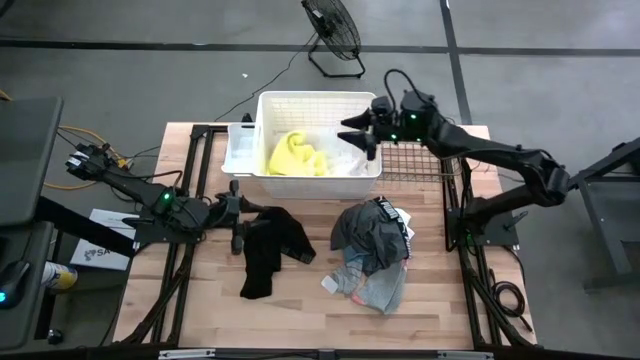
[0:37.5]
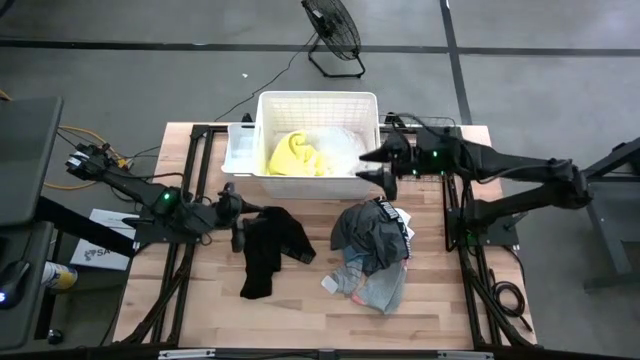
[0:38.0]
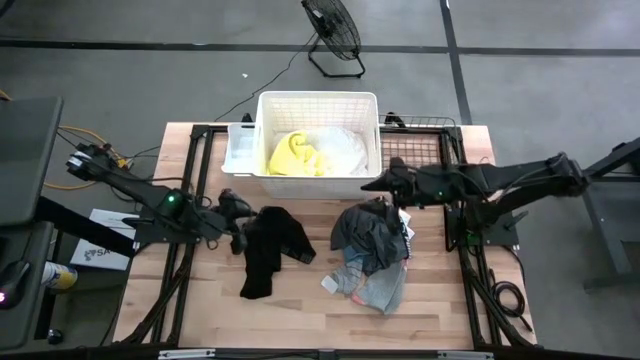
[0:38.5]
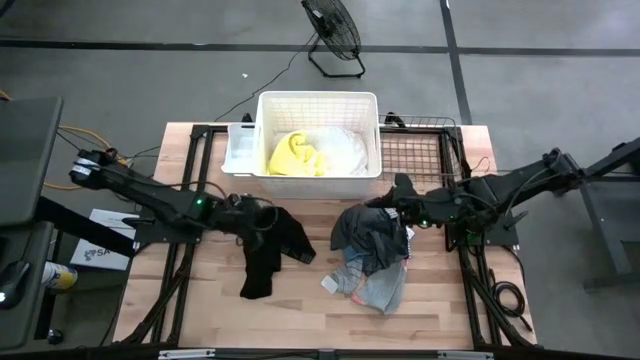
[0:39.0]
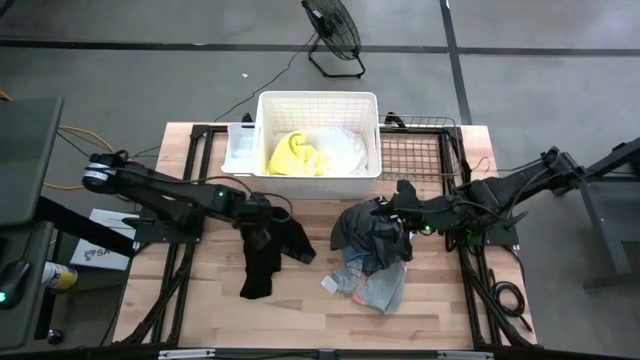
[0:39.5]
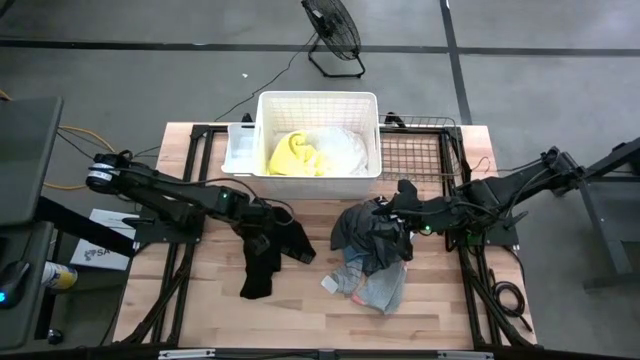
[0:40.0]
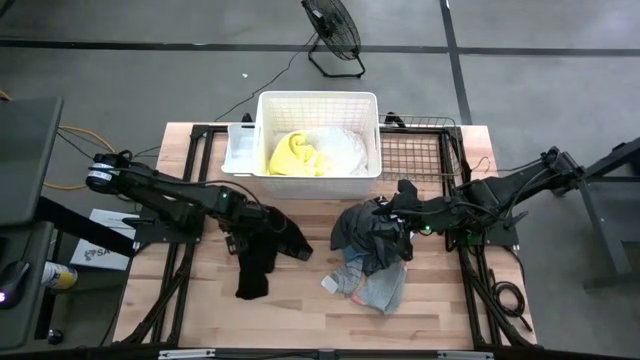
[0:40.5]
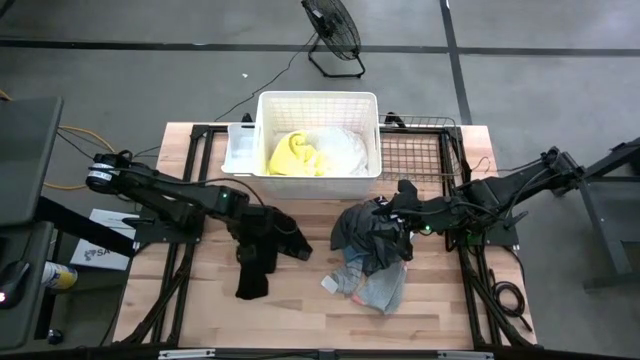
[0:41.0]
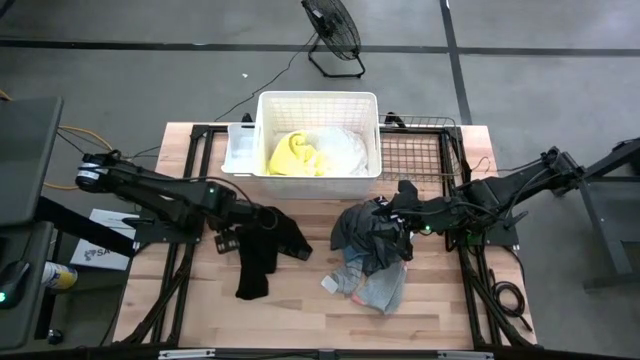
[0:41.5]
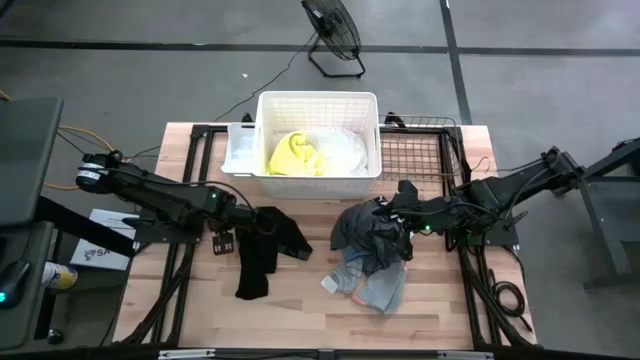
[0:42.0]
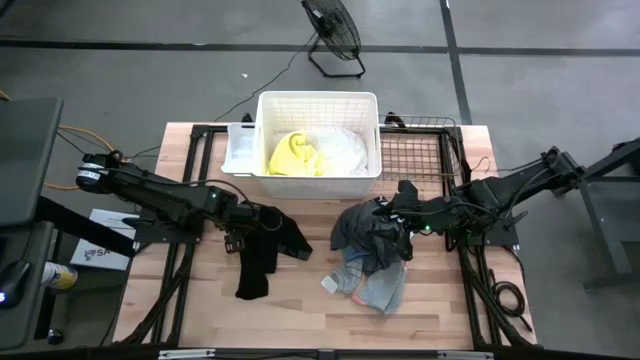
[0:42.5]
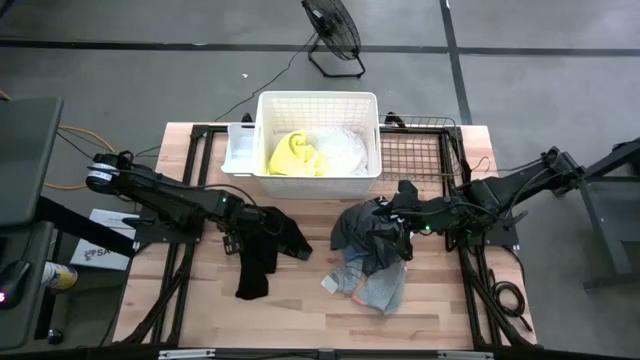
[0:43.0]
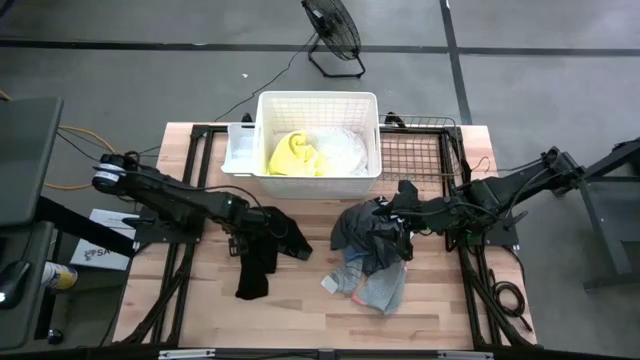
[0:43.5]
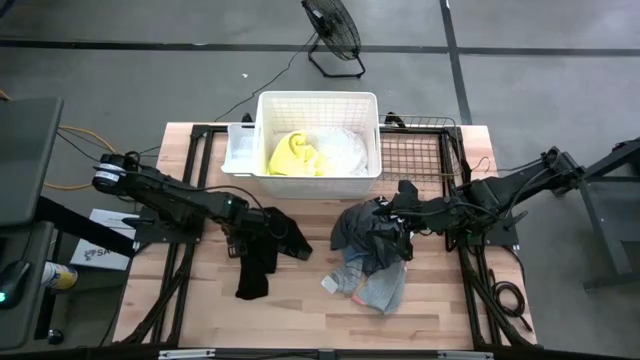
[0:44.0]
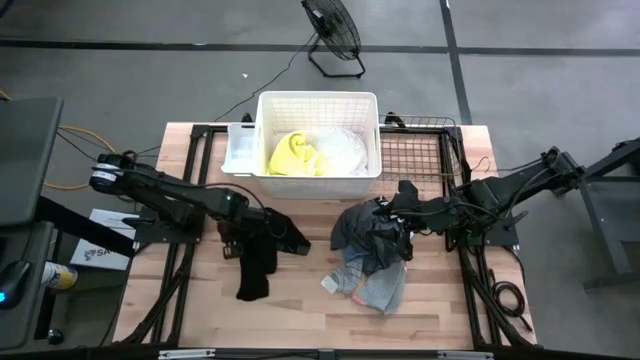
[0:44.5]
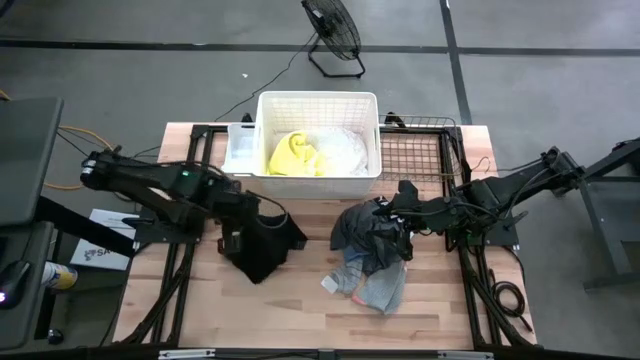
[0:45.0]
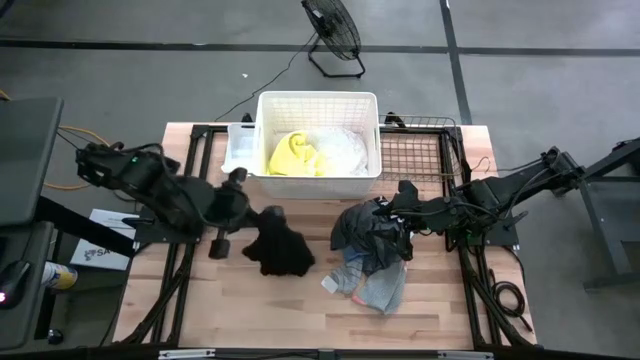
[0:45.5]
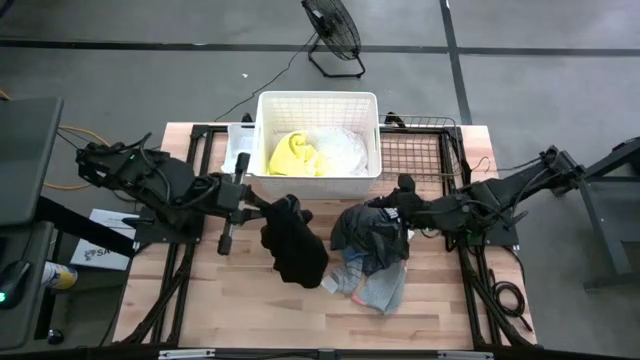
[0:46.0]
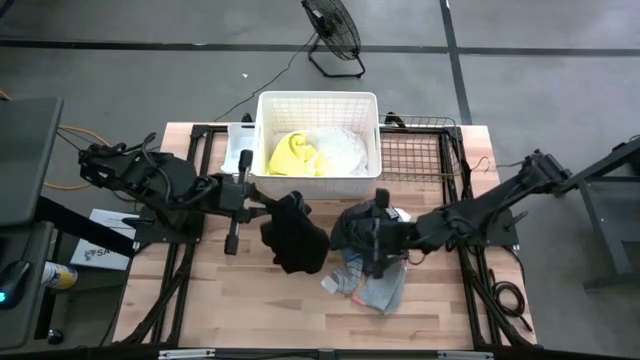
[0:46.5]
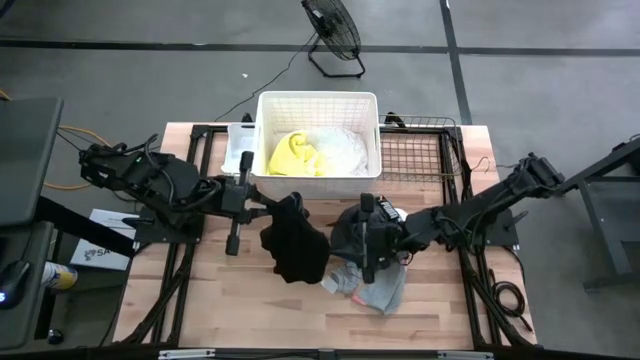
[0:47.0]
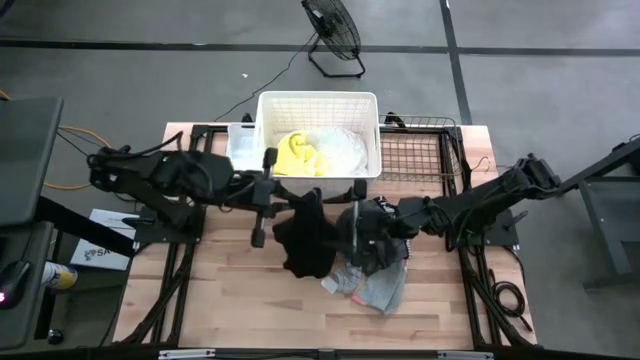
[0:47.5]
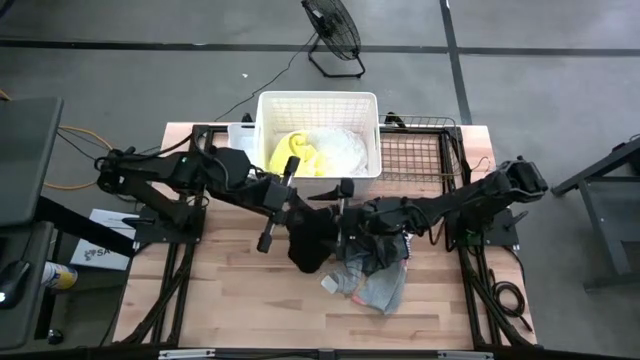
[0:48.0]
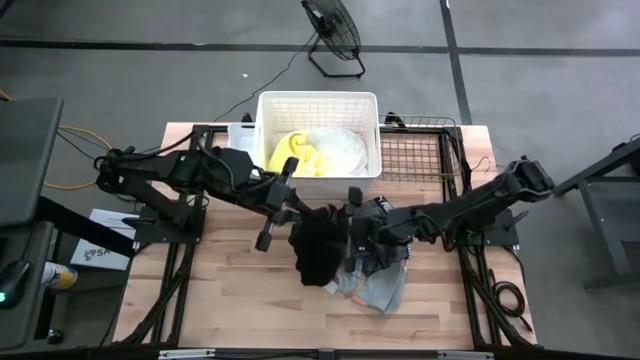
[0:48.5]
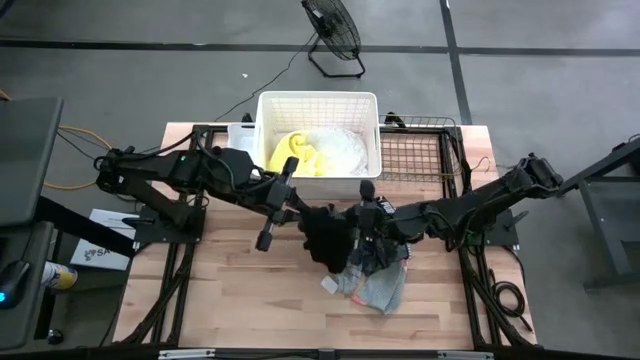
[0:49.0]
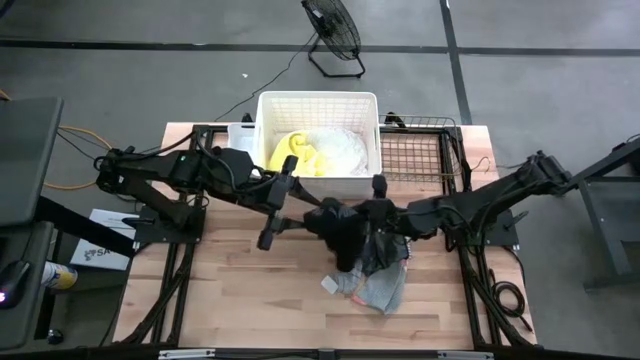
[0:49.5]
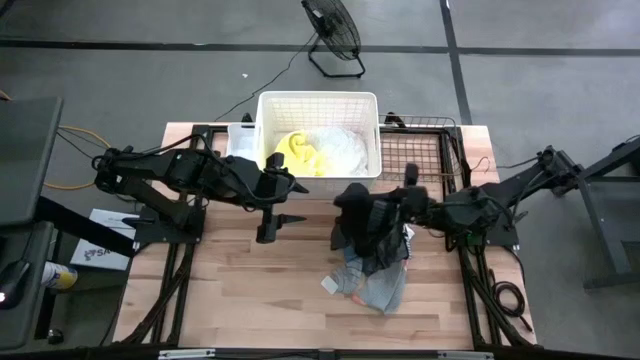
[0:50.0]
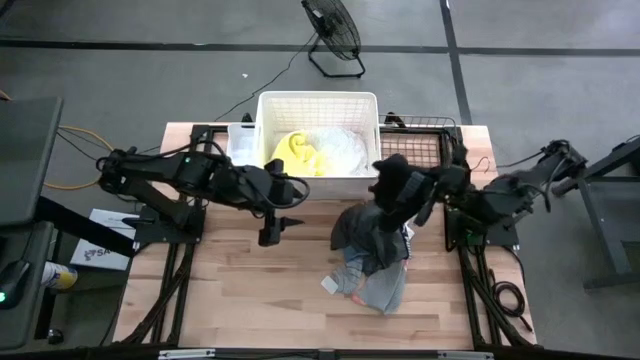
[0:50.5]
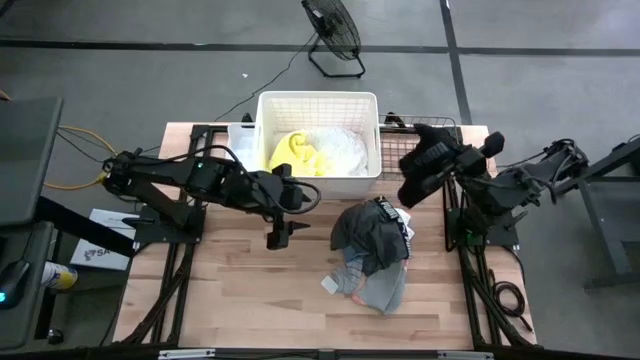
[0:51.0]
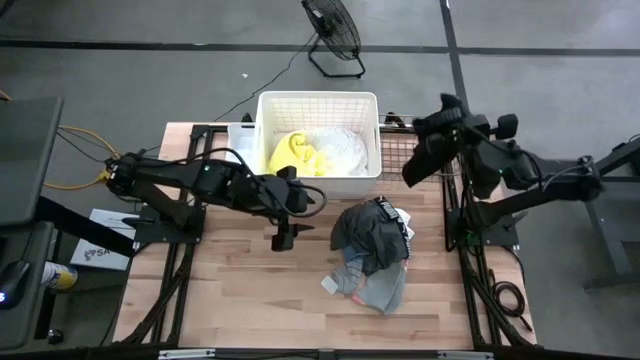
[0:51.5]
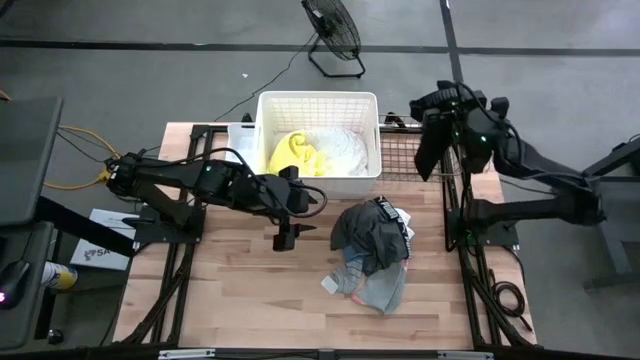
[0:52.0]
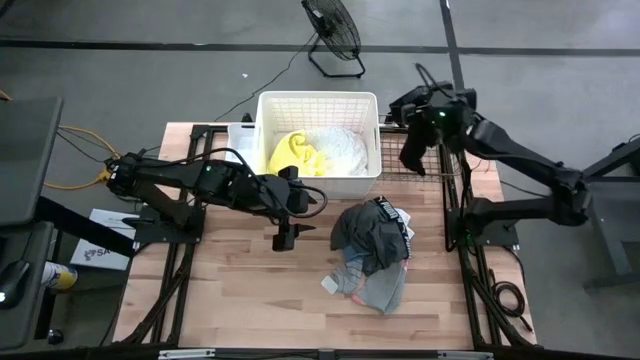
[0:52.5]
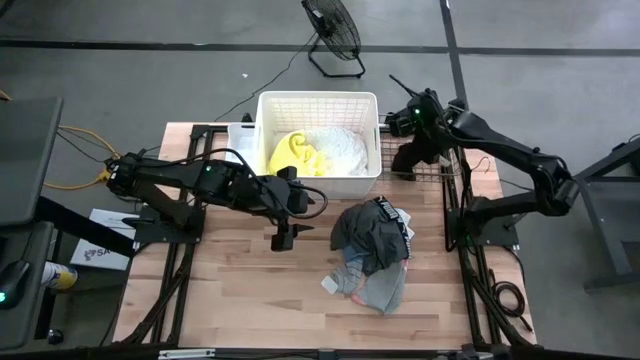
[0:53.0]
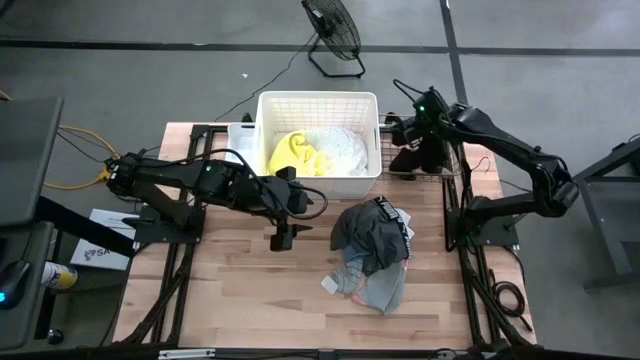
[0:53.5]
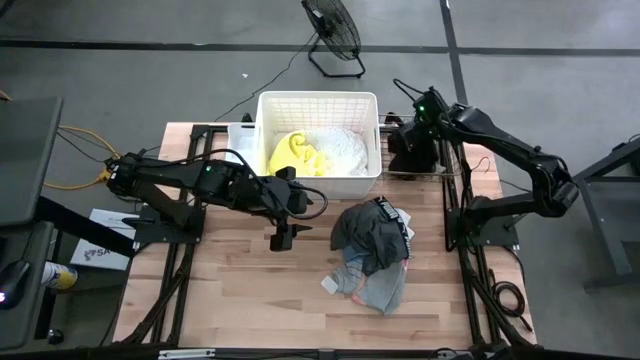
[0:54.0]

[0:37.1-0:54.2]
Task: Pick & Place Cloths
Put the black shorts into the wire basket

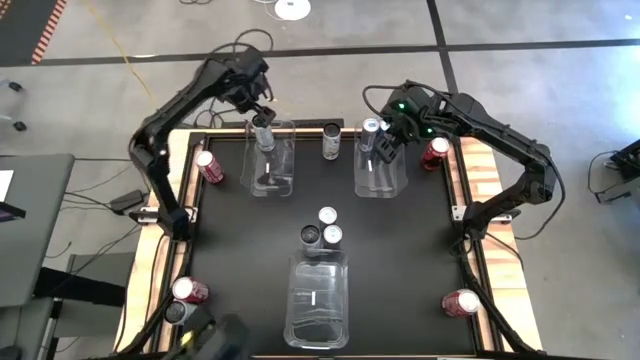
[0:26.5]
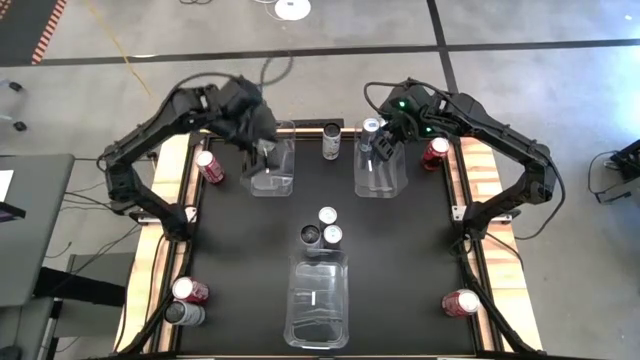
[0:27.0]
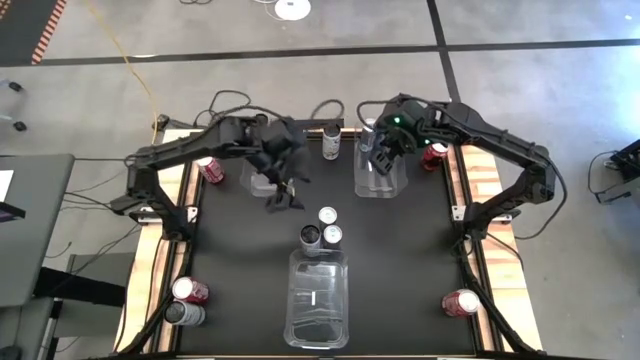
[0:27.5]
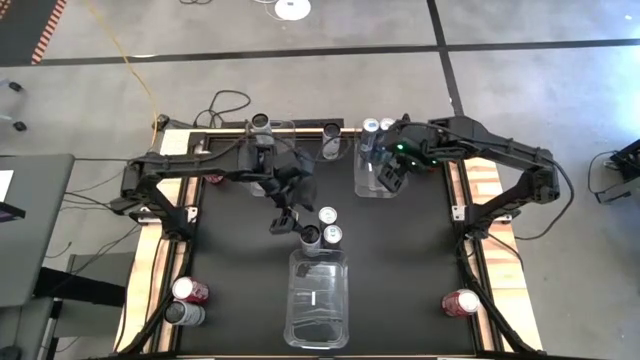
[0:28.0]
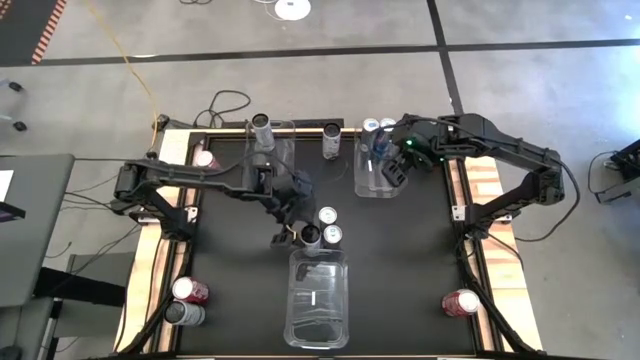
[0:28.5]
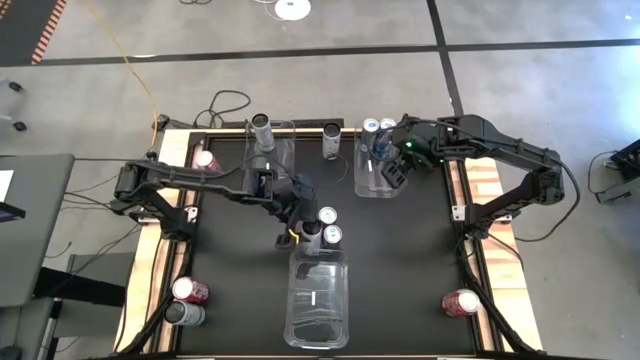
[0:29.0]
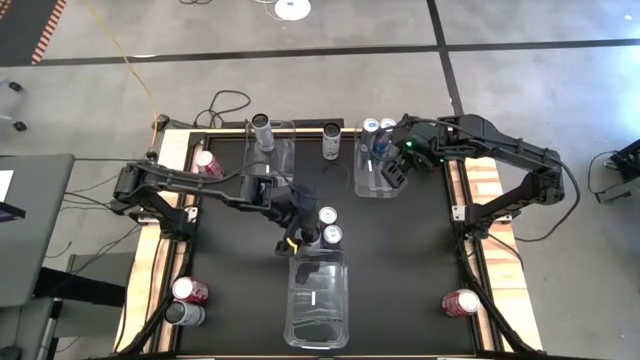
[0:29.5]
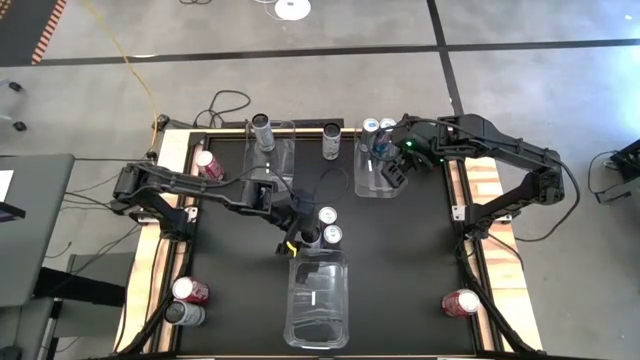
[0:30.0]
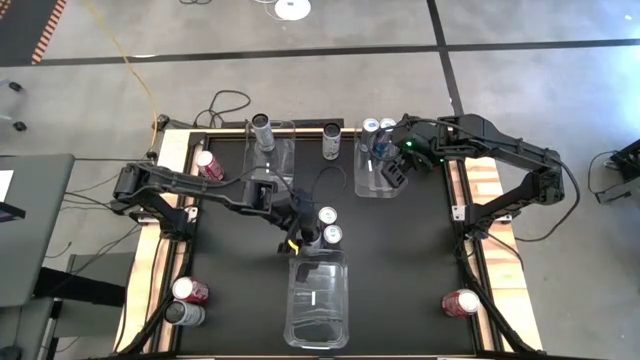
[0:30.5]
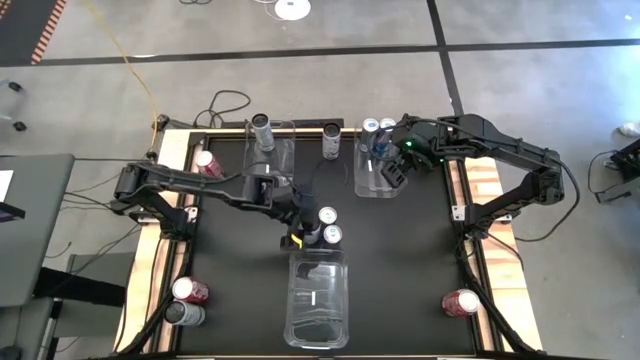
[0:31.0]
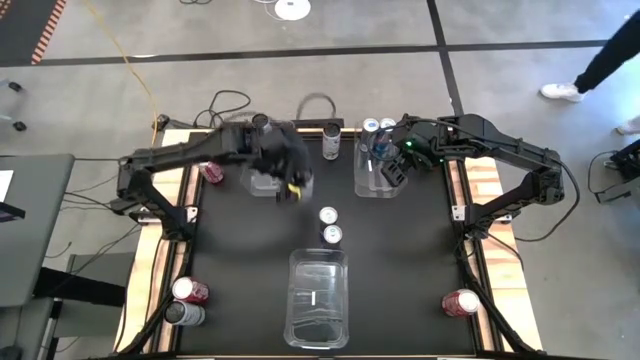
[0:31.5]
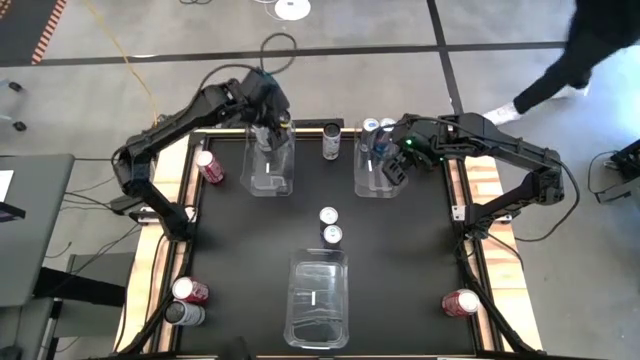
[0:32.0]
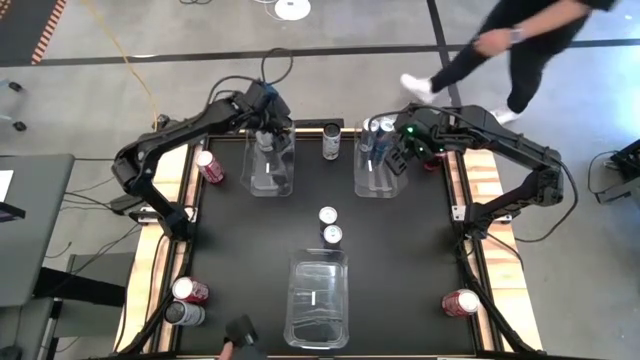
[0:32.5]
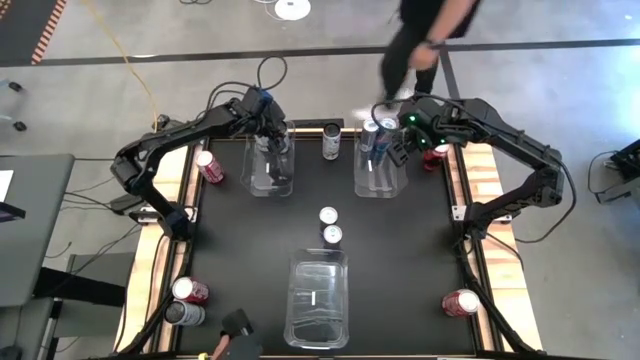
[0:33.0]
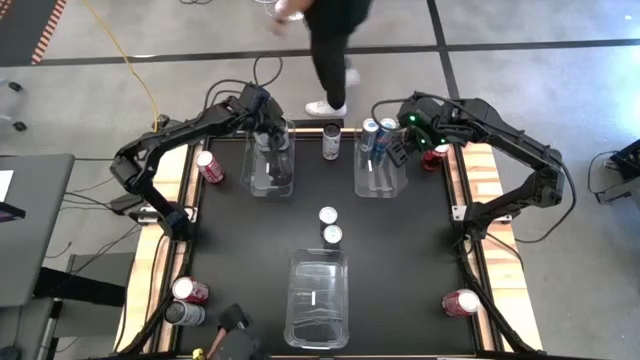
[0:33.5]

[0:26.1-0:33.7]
Task: Sort soda cans
Put the middle white soda can into the top left transparent bin
